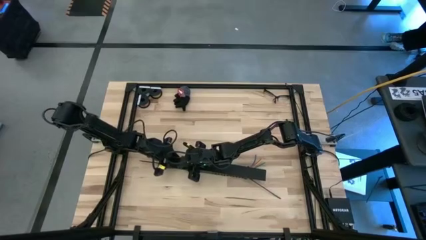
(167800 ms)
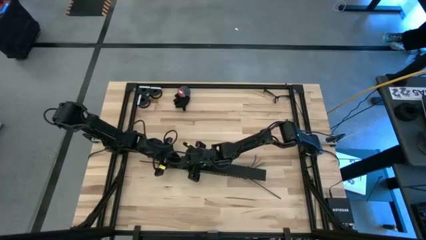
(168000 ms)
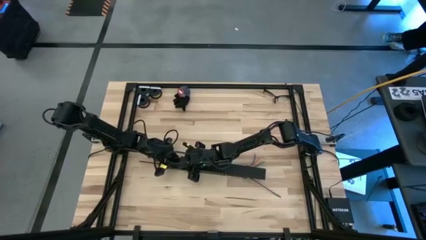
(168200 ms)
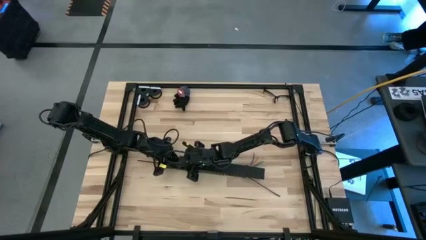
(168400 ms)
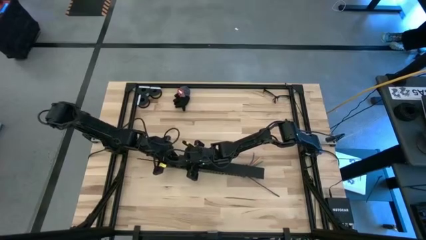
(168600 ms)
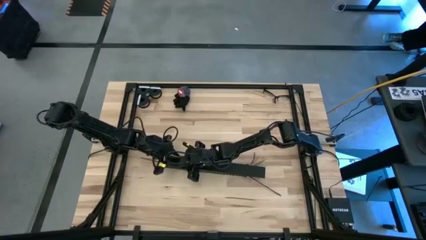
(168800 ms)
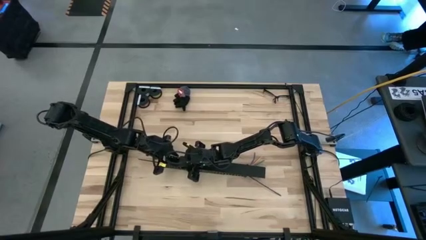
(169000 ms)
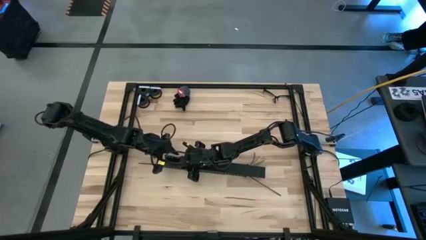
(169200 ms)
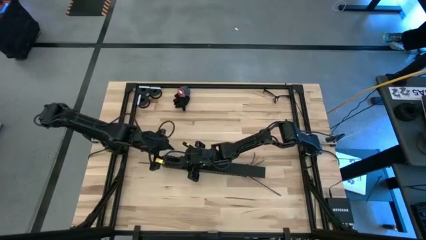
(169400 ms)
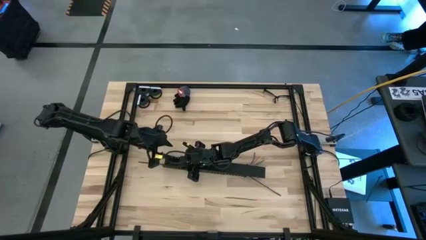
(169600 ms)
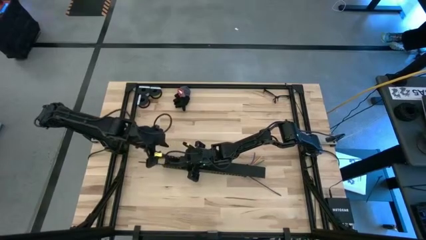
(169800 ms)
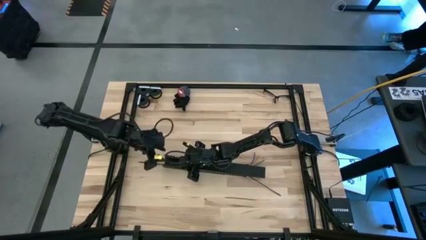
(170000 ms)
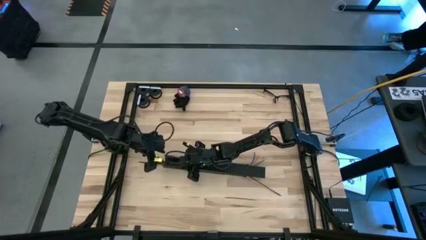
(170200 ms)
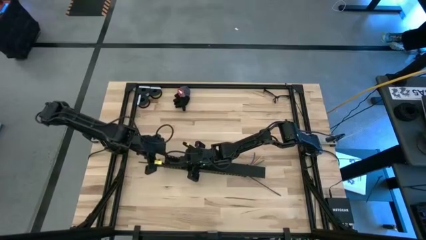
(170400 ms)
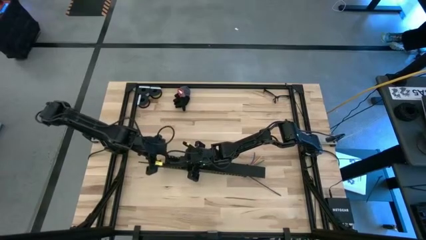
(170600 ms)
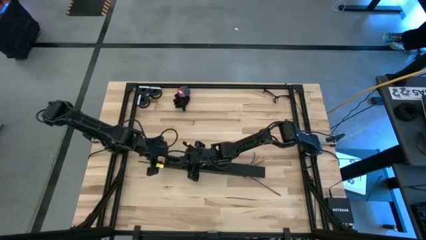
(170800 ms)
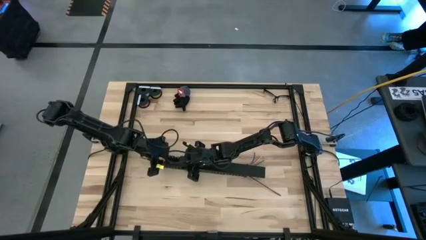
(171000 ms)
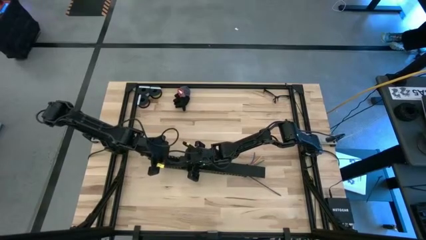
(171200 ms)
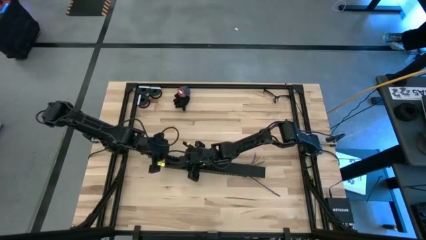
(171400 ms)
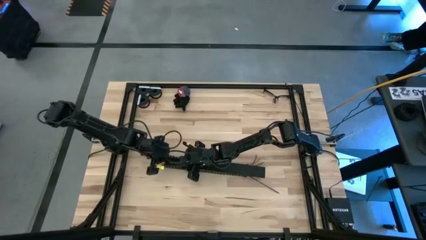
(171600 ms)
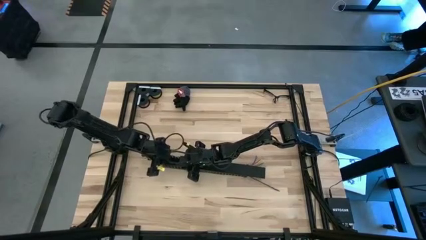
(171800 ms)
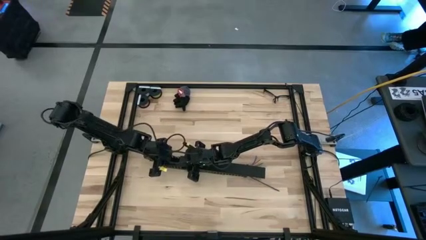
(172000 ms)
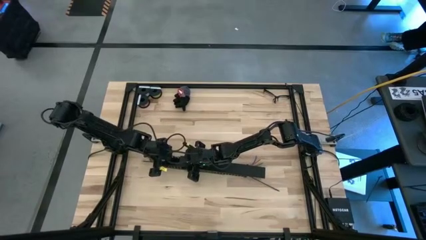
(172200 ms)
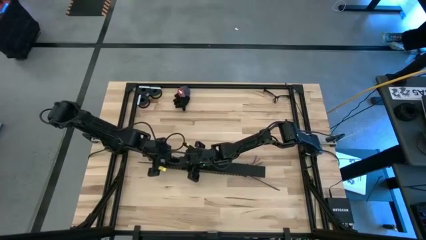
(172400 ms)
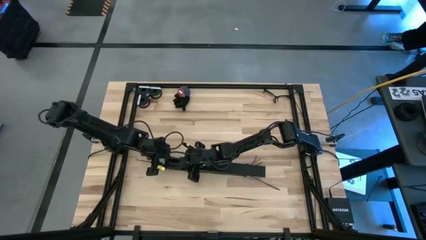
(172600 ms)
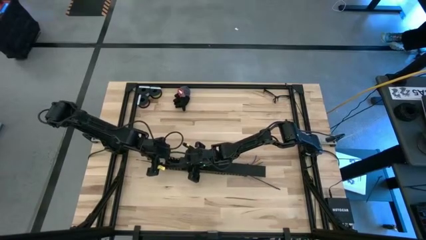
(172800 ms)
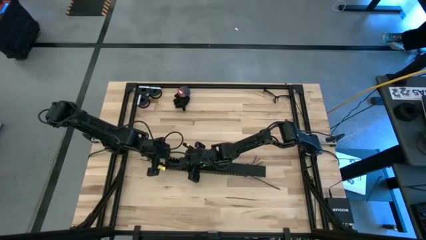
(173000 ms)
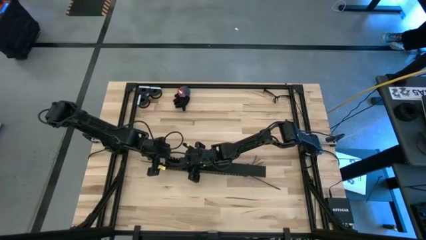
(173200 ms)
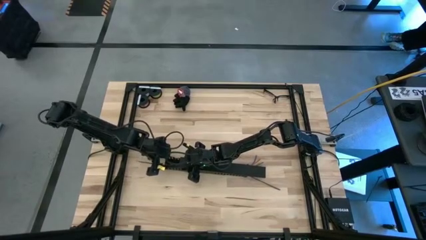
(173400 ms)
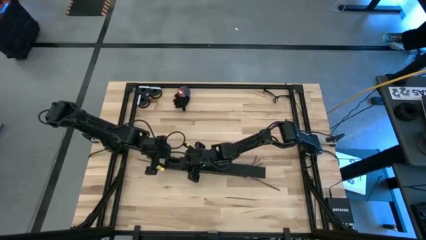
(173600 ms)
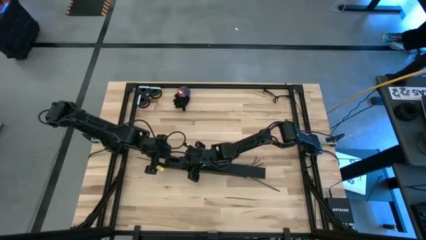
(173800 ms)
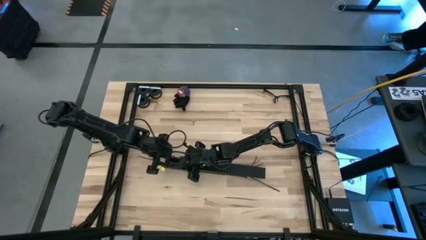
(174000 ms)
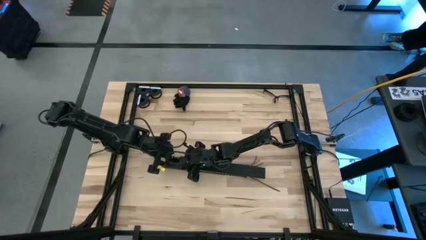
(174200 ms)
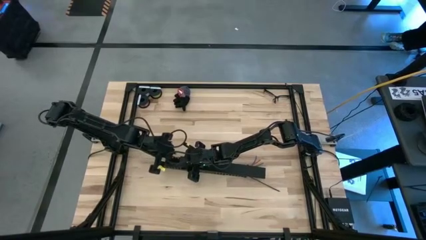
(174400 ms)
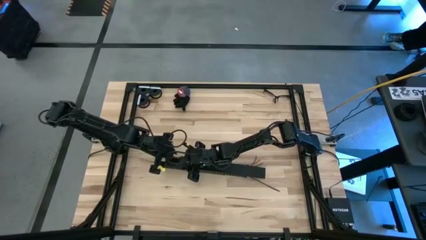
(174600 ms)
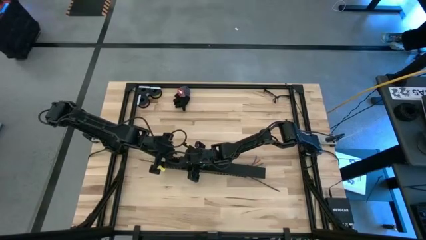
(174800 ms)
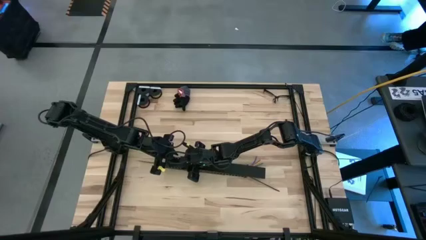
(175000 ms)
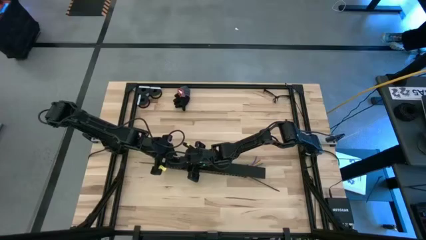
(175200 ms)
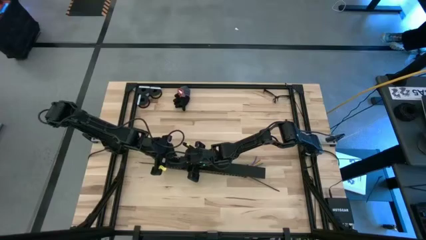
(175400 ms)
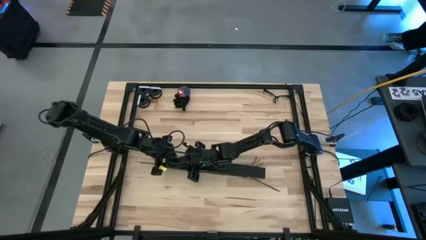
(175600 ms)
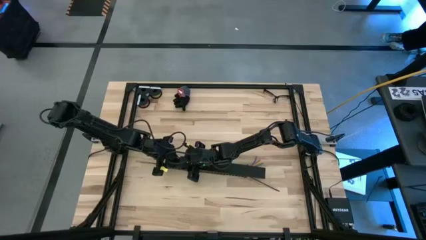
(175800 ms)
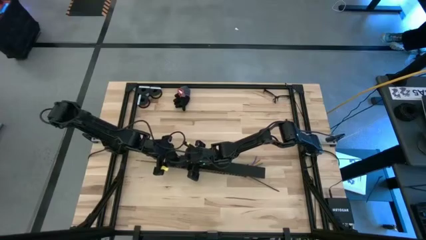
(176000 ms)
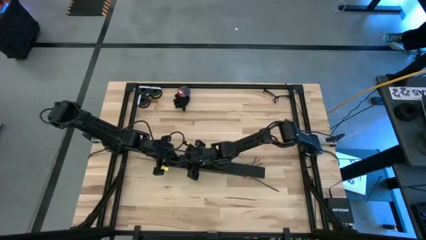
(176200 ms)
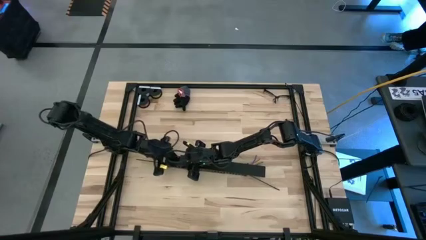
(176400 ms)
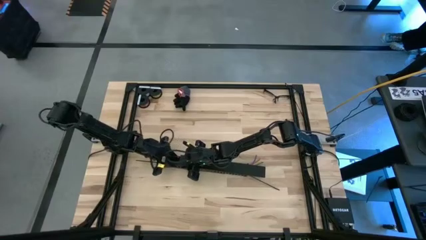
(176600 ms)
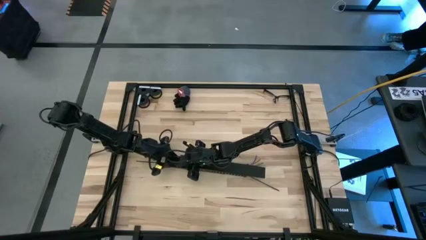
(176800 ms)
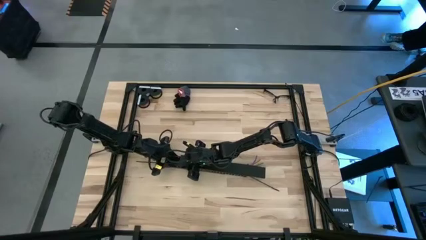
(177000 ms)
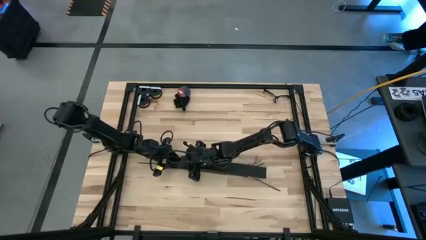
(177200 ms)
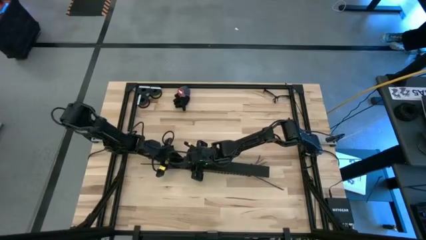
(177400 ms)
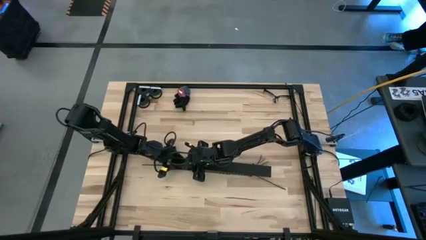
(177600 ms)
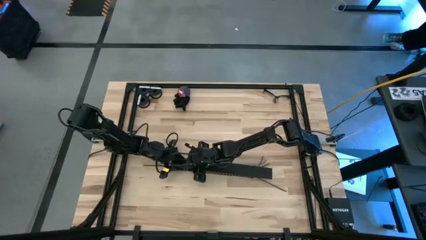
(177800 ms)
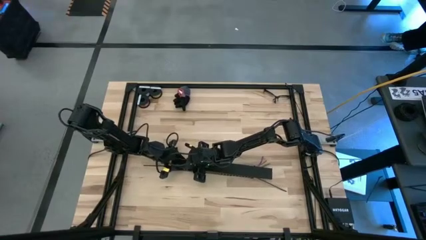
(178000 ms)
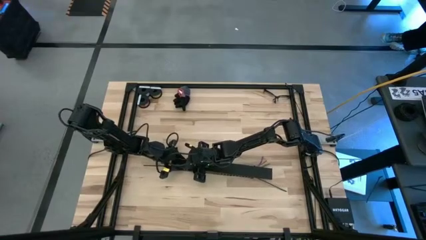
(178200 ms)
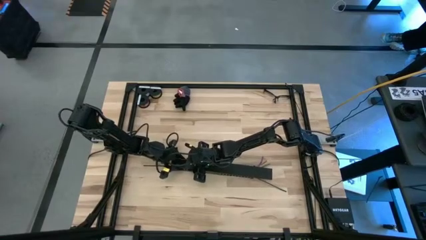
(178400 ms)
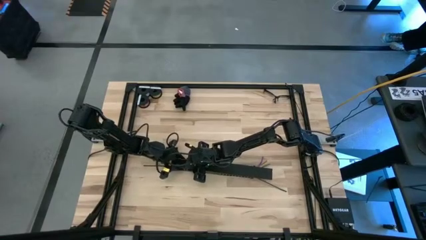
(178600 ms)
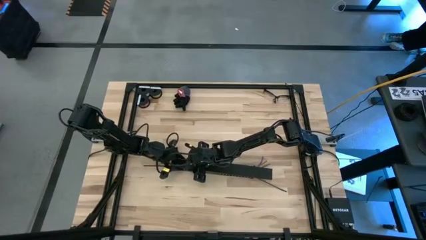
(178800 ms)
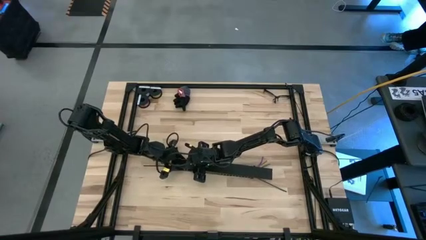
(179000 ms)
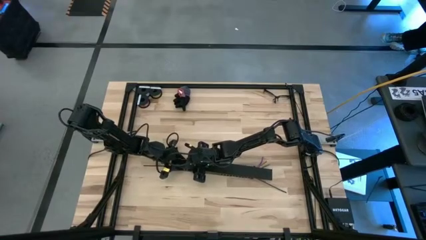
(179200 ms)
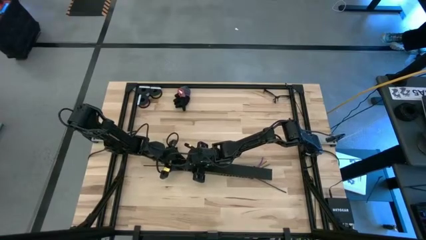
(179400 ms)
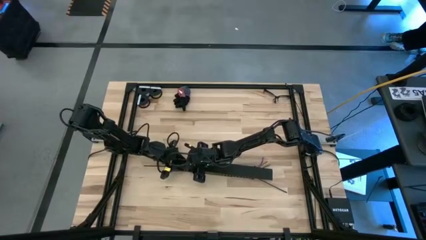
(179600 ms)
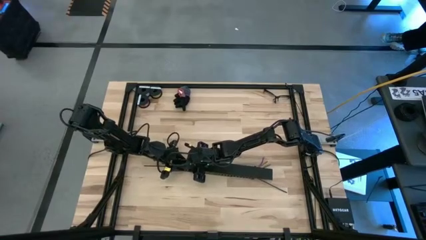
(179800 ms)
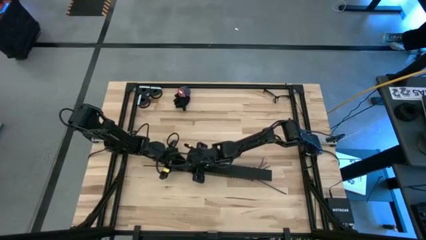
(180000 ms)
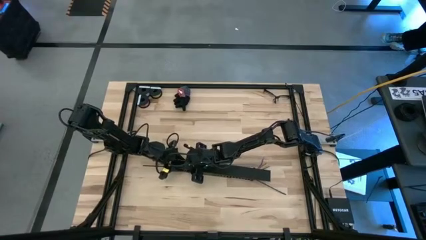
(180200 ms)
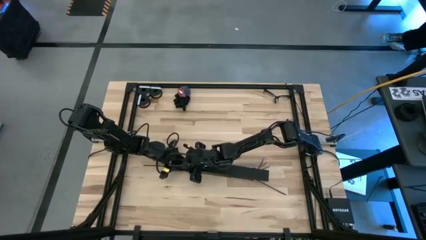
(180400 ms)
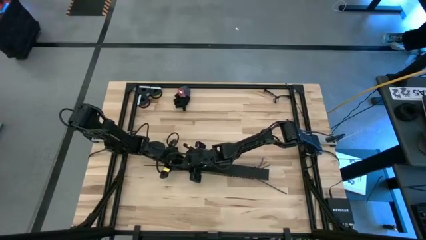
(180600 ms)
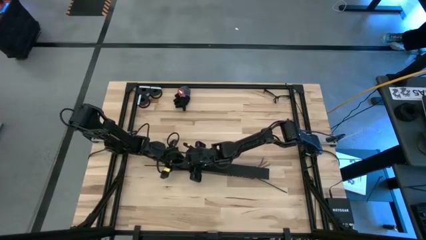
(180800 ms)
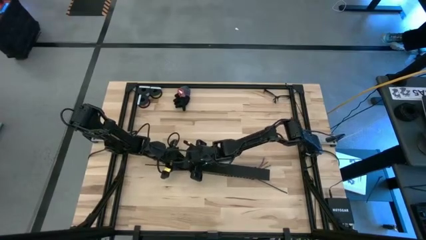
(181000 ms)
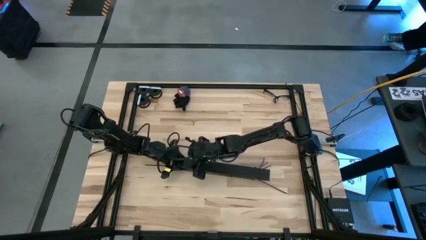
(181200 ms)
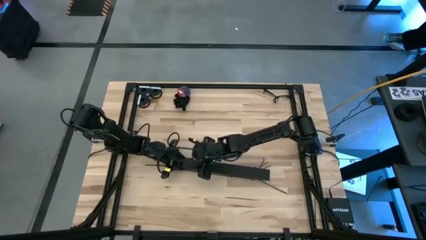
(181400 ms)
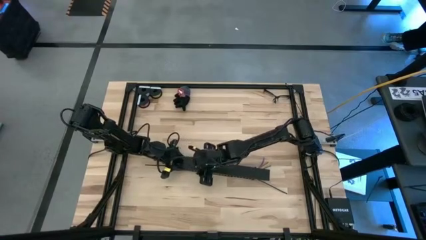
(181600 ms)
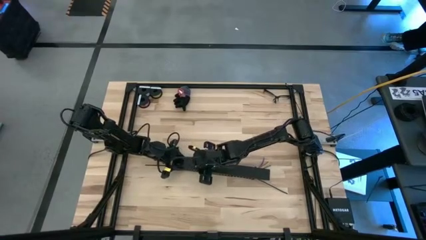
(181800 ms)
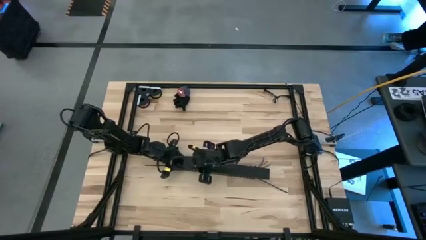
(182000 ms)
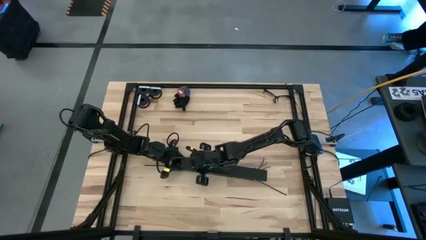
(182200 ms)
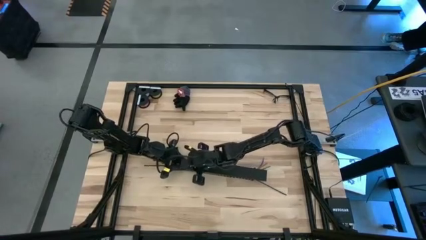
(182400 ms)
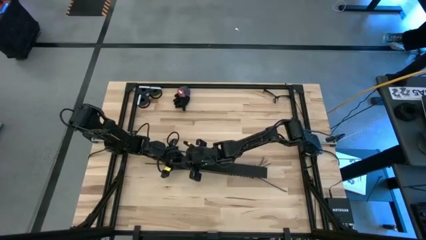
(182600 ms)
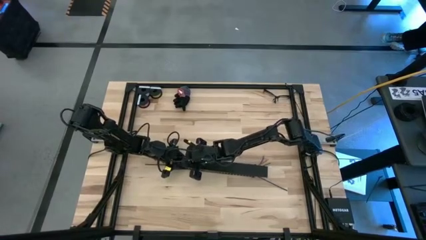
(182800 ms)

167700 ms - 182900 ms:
Task: Ziptie cables
Close the black cable duct with the cable duct cover
